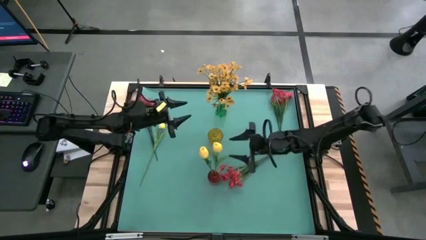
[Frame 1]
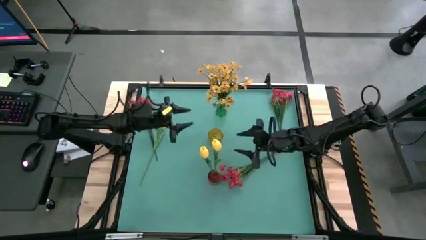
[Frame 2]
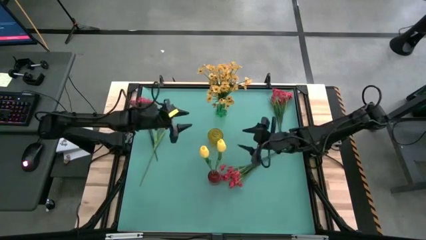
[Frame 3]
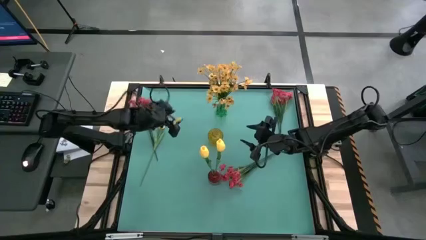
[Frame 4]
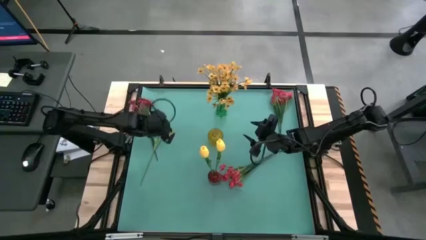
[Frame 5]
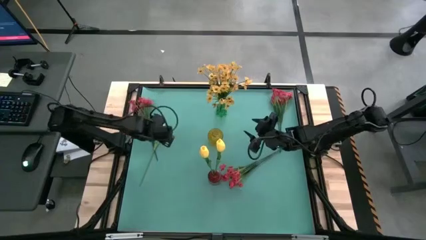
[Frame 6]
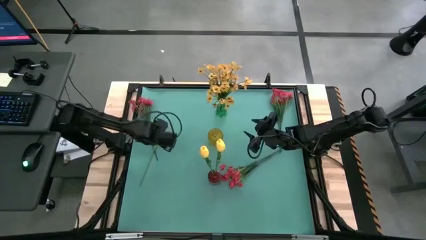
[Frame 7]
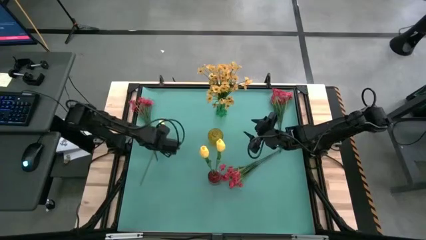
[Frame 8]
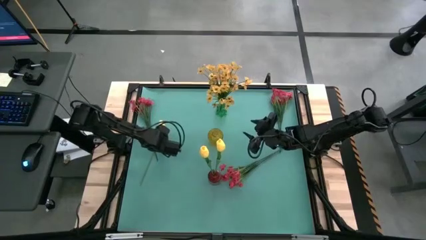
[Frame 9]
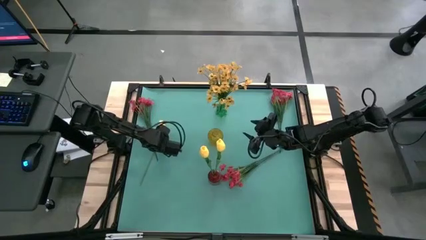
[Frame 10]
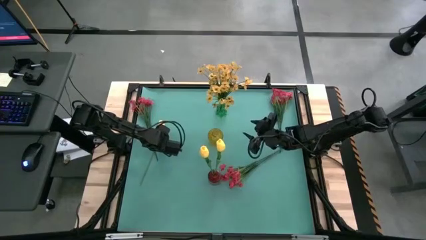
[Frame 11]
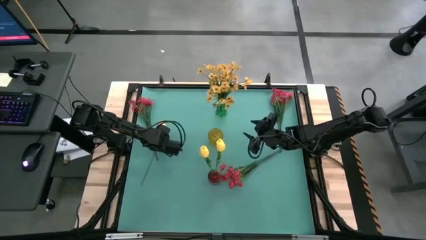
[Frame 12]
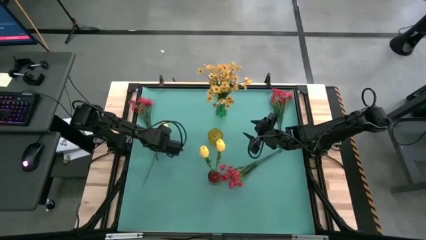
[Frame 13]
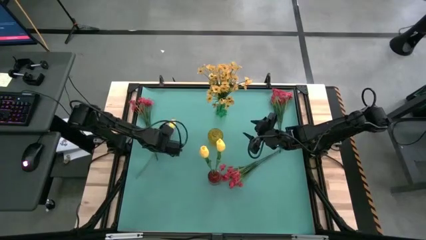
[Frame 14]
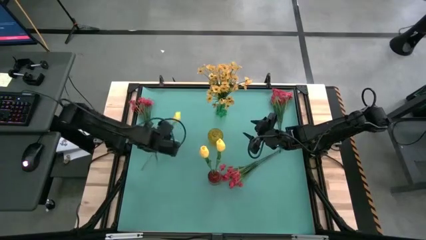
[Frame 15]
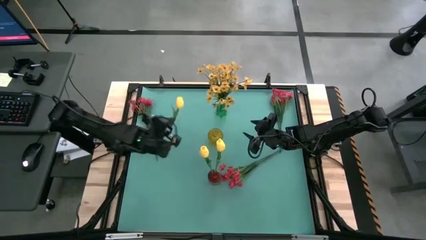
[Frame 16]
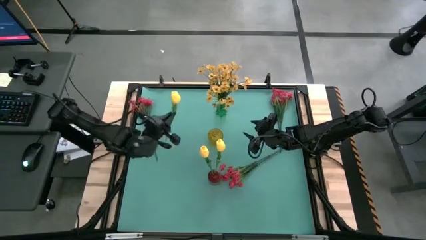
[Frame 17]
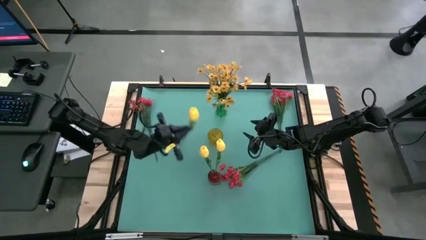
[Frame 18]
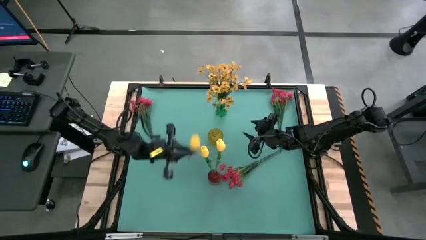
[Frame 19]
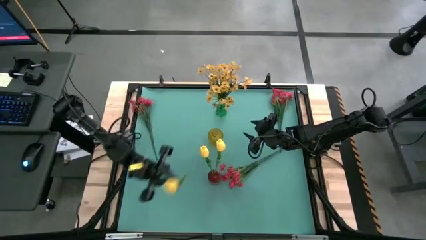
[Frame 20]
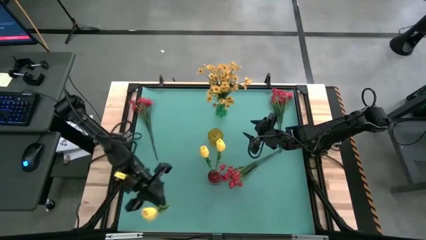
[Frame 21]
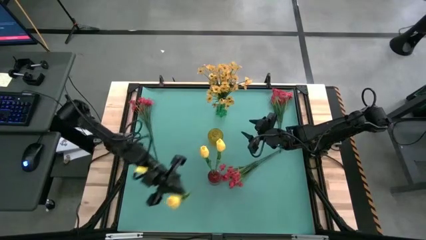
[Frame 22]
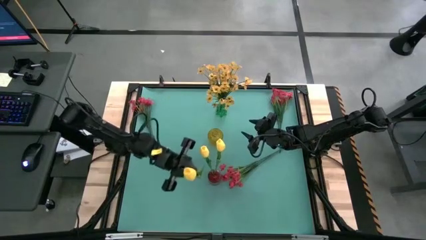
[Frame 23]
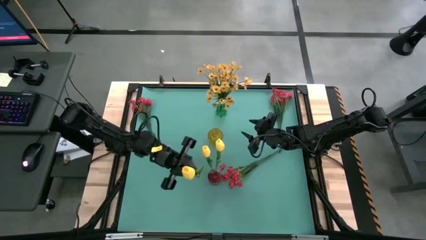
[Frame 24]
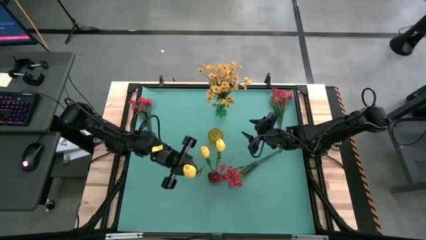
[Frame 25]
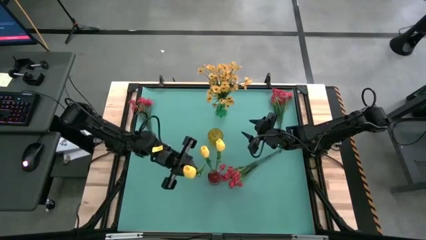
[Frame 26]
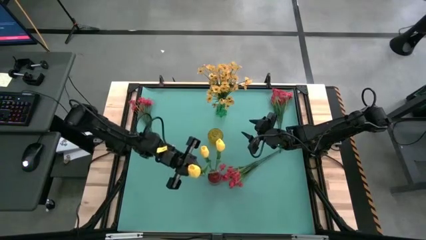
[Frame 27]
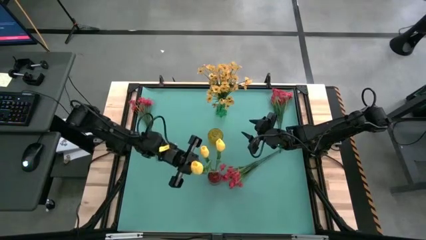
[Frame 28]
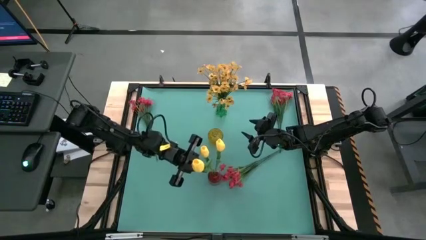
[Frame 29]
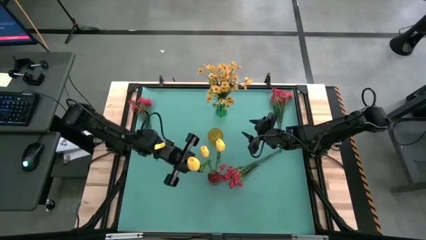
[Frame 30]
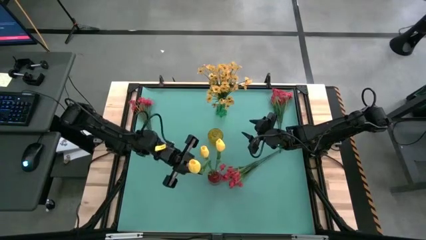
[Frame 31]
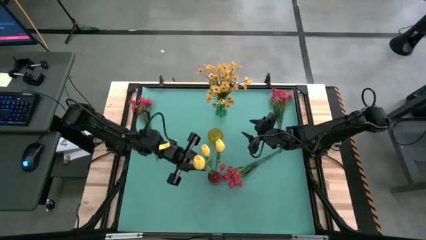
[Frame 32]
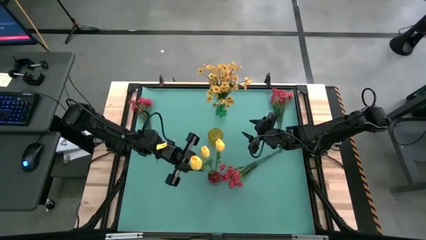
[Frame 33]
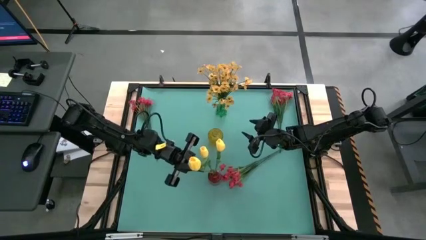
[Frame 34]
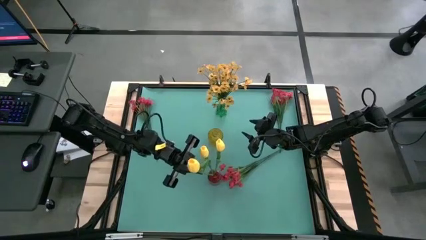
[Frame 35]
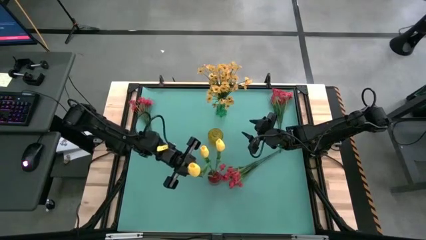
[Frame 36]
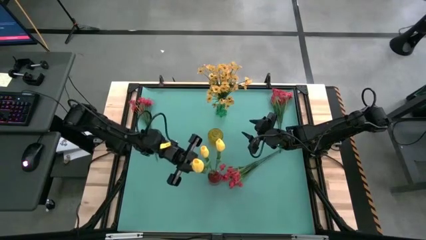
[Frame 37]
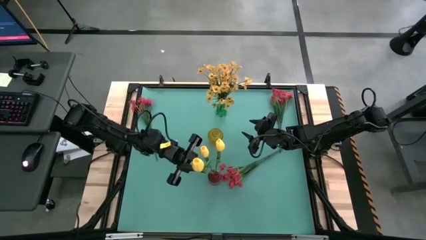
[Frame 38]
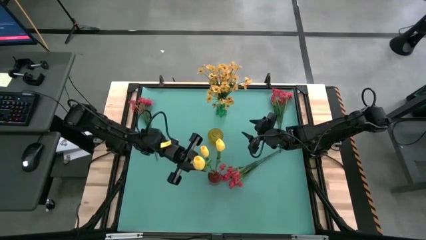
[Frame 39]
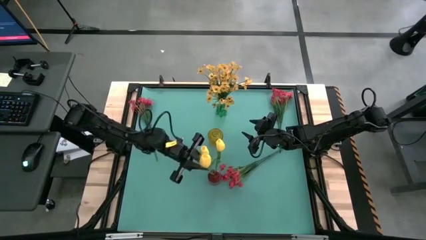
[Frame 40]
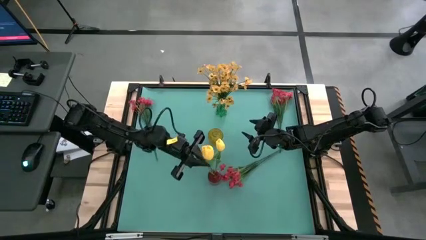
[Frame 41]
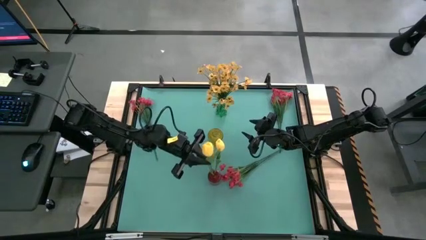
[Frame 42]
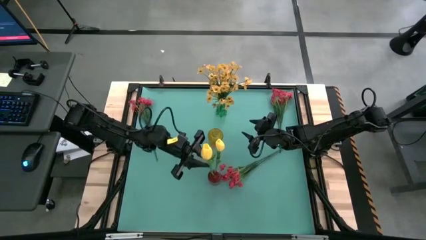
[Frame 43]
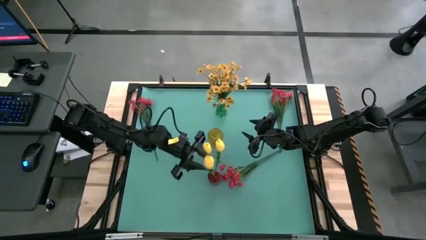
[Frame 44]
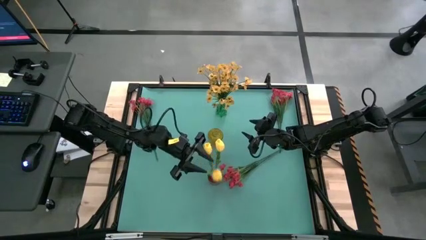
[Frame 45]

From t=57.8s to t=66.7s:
Task: Sort flowers into vase by color
Put the yellow flower into the red vase

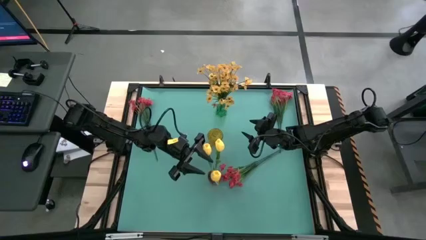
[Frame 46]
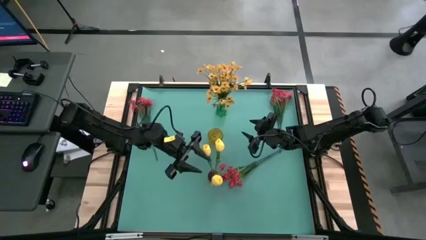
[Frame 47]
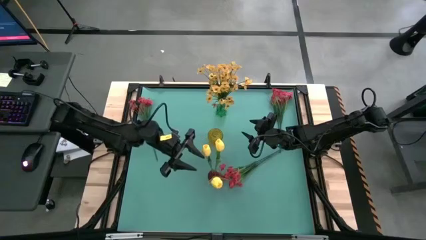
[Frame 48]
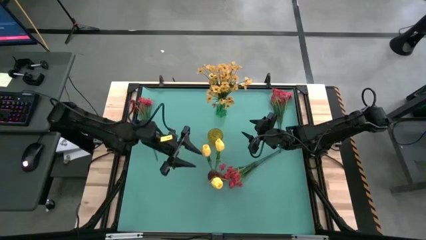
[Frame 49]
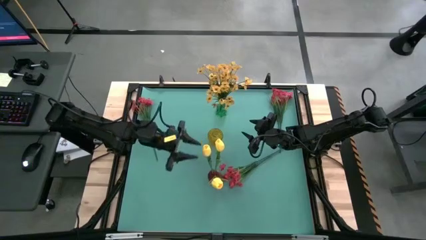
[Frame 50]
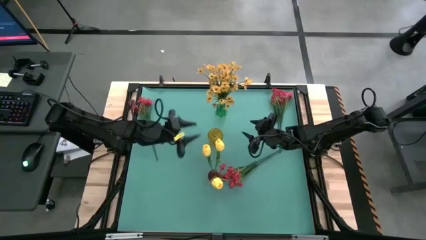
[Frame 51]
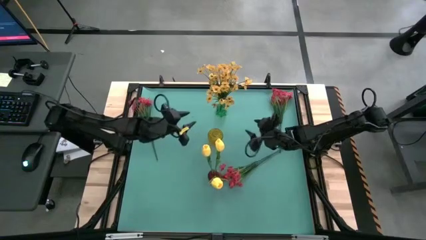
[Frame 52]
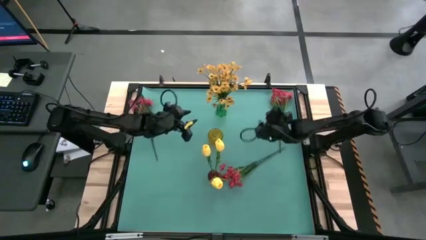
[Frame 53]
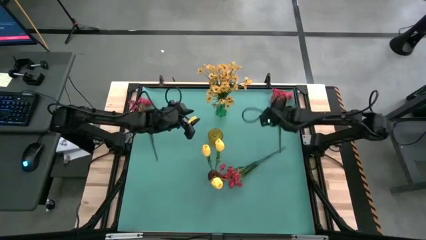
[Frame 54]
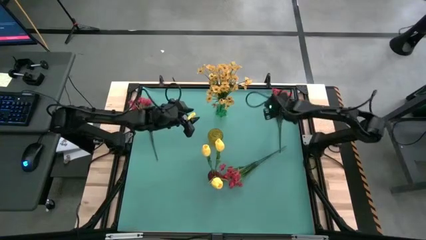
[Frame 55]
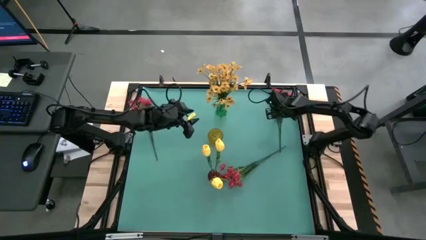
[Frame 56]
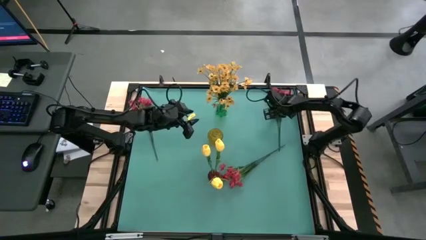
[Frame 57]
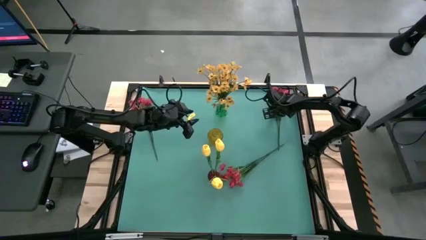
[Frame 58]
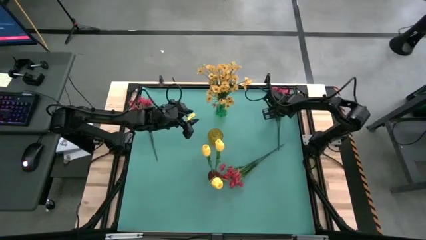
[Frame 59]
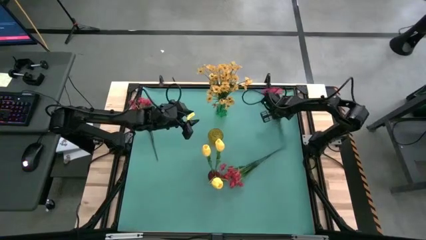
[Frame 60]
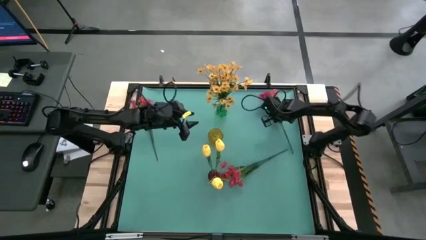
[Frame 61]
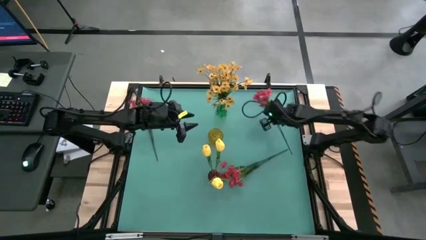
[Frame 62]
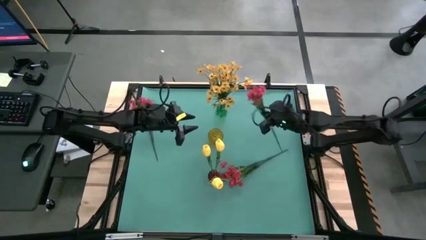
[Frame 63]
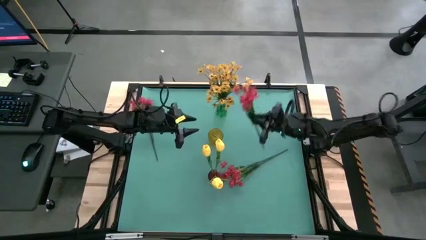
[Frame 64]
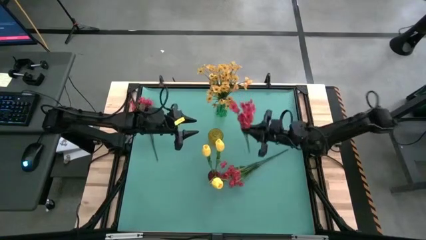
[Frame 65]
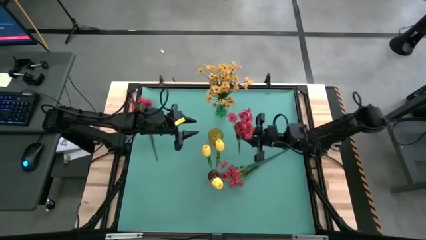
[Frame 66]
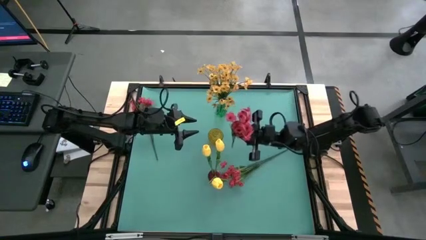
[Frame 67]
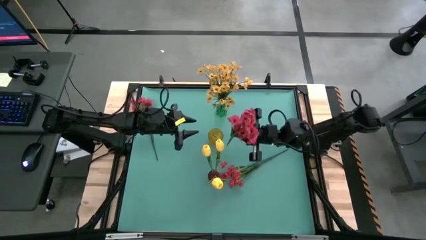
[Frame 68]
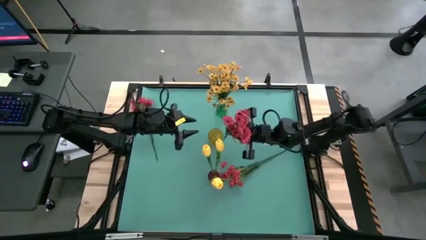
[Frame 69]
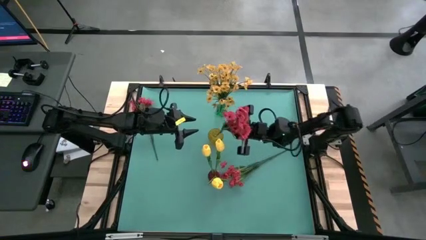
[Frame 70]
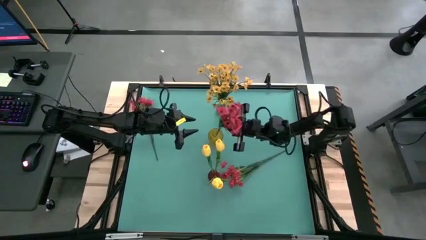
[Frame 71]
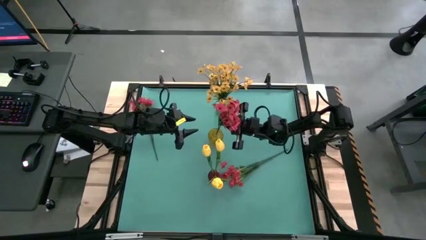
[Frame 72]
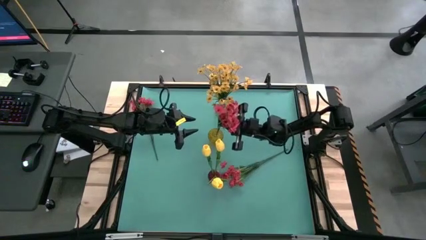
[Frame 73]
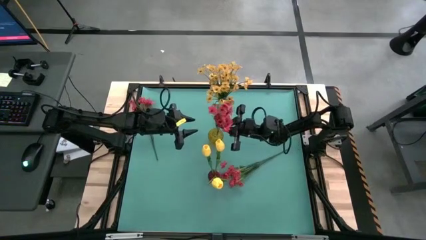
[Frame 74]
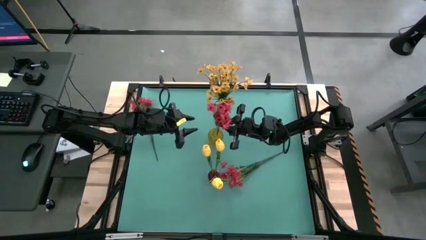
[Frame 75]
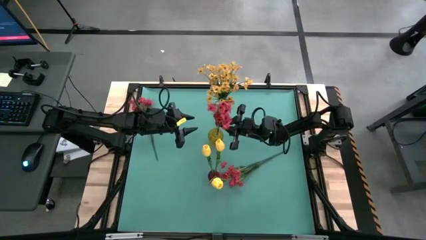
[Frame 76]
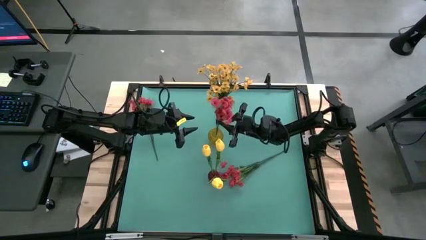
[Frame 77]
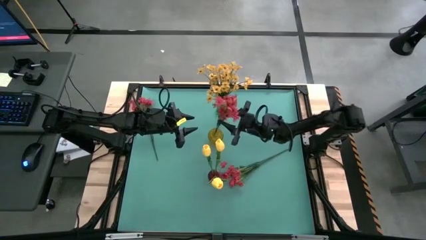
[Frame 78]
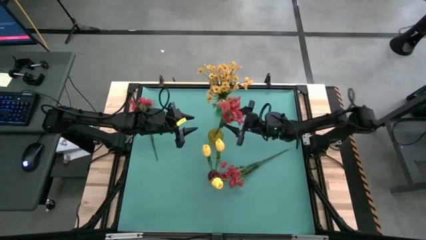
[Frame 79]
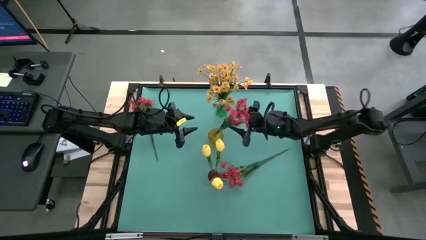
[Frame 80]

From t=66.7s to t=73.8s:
Put the right red flowers into the yellow vase
